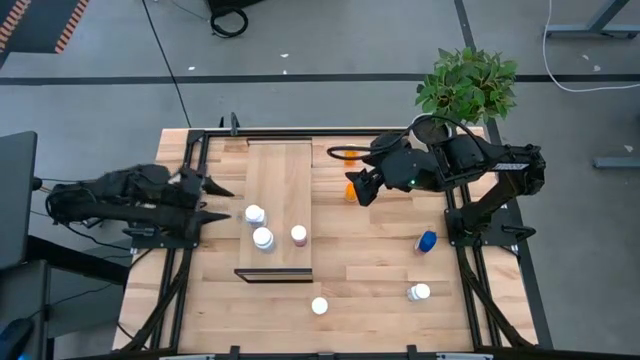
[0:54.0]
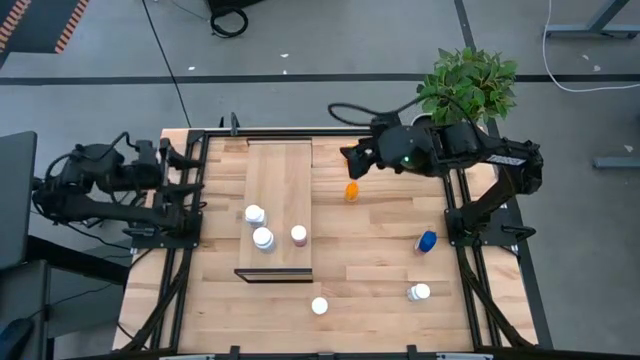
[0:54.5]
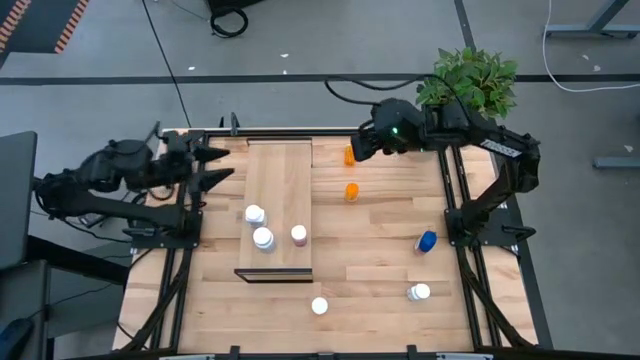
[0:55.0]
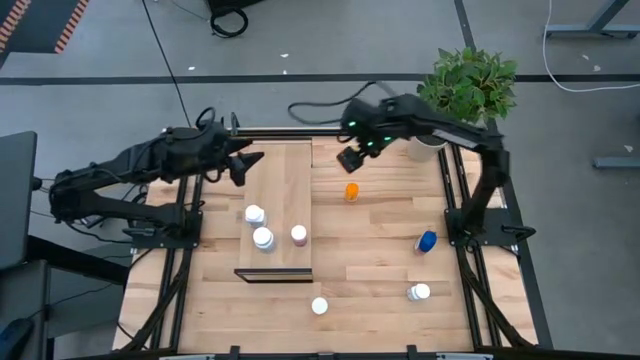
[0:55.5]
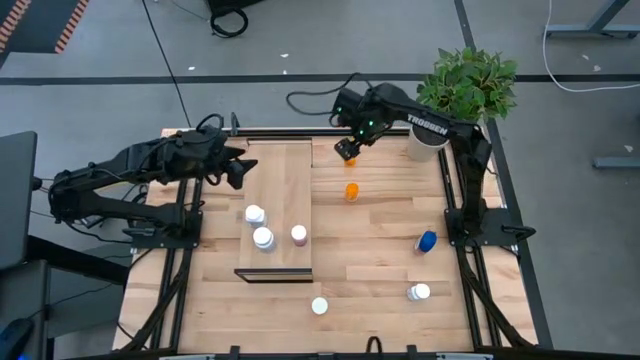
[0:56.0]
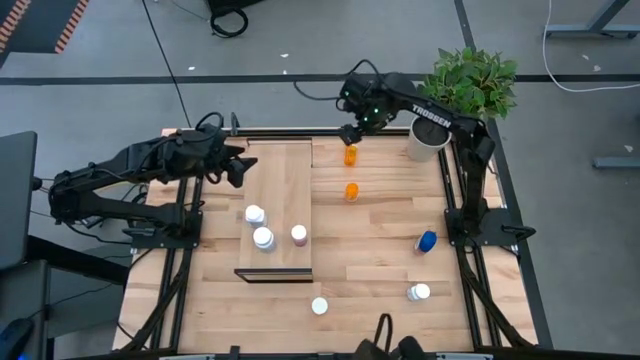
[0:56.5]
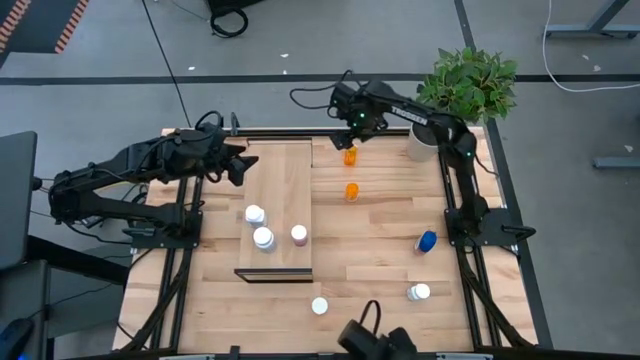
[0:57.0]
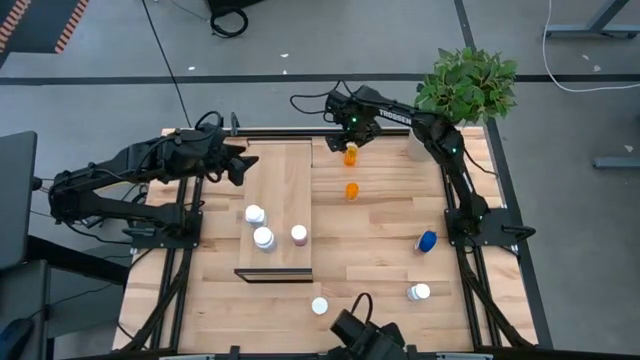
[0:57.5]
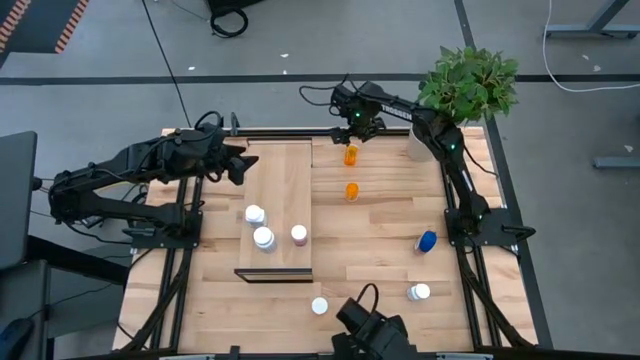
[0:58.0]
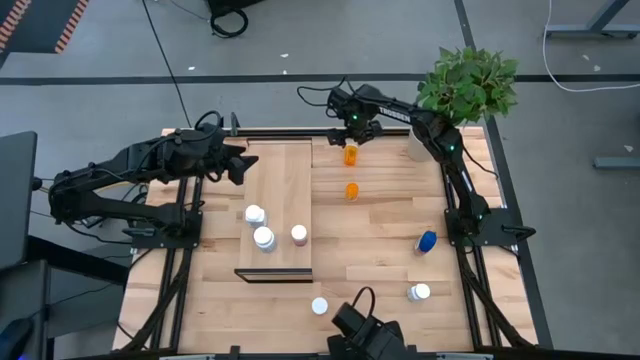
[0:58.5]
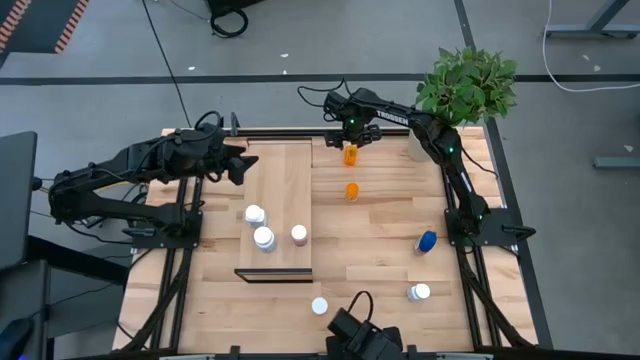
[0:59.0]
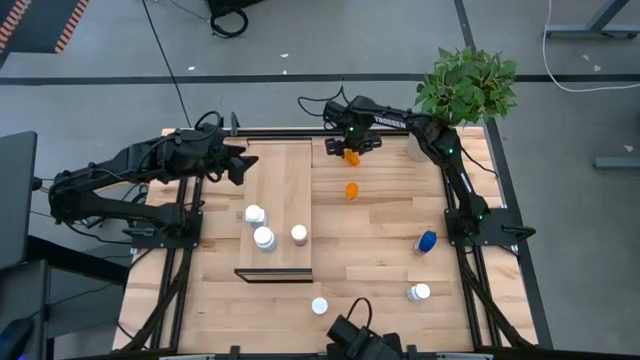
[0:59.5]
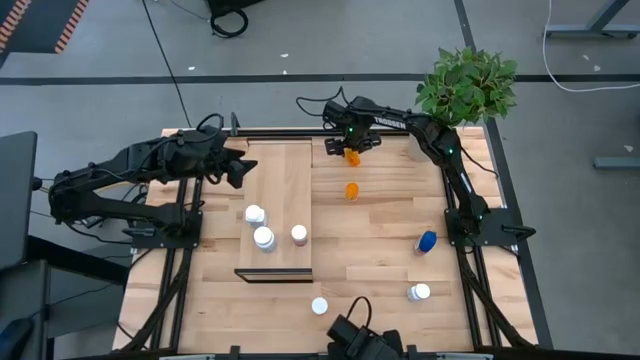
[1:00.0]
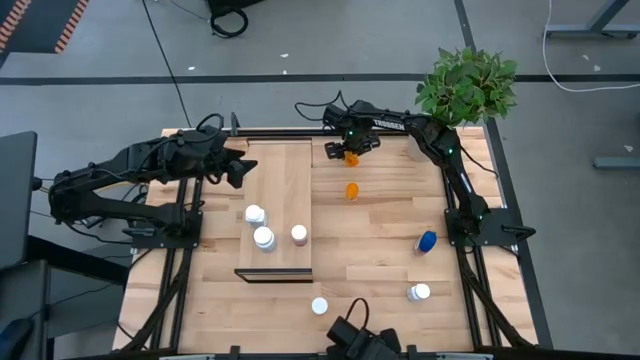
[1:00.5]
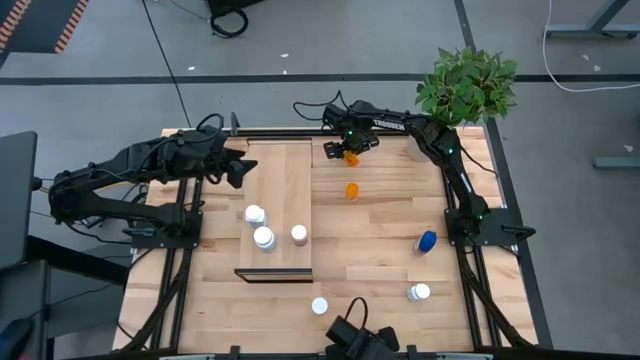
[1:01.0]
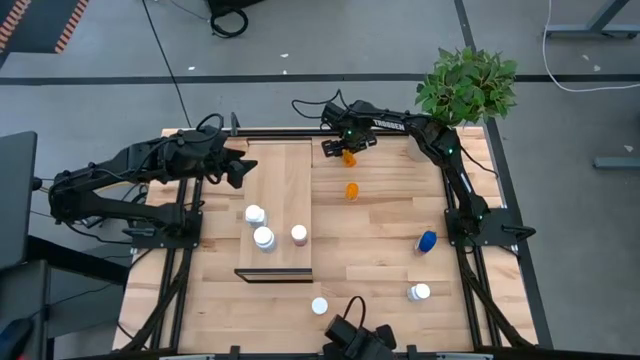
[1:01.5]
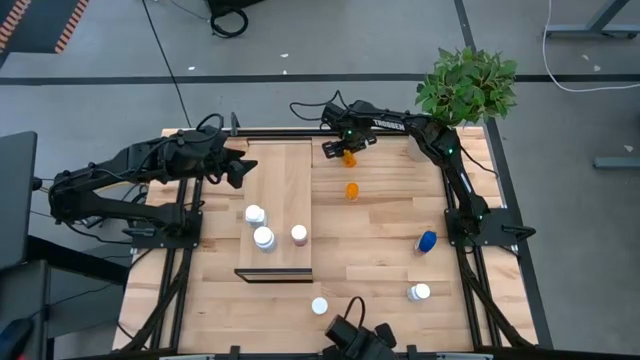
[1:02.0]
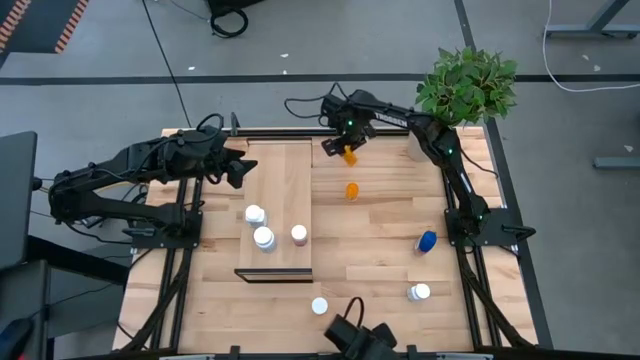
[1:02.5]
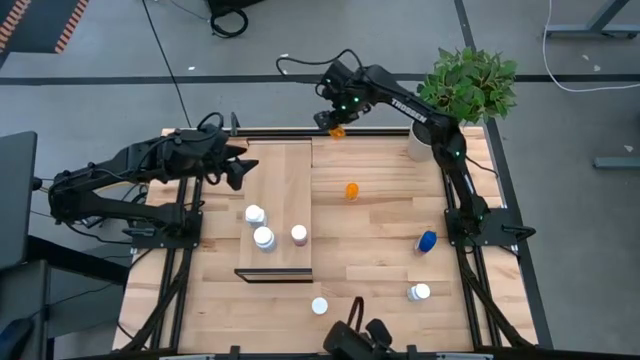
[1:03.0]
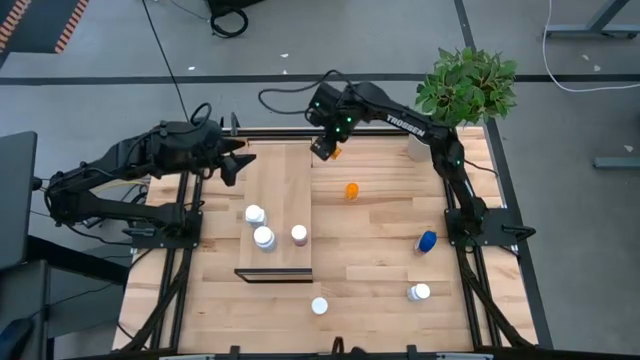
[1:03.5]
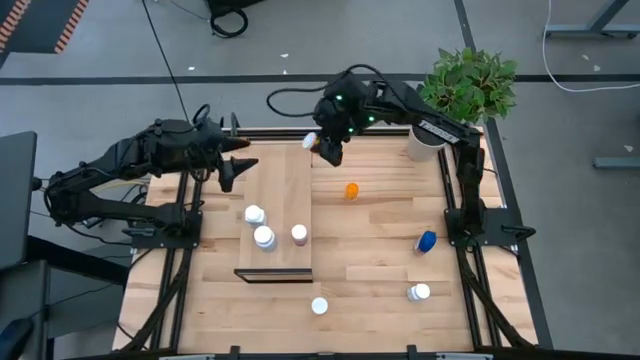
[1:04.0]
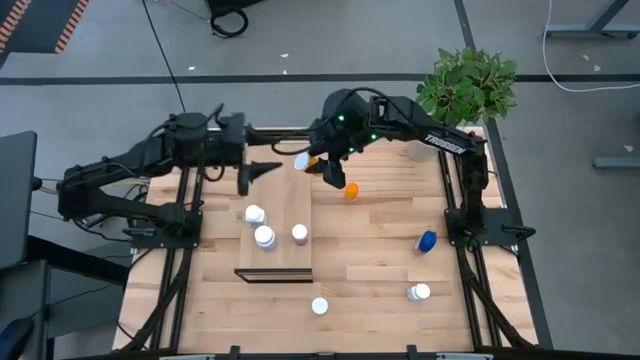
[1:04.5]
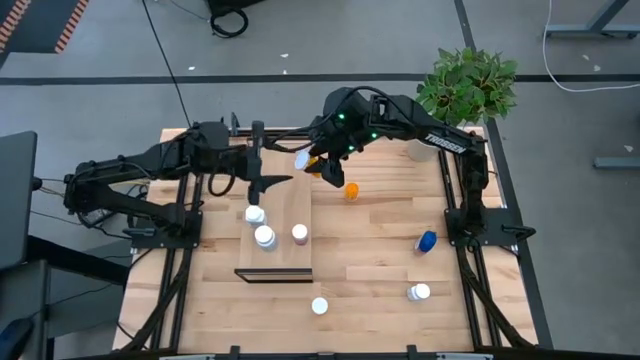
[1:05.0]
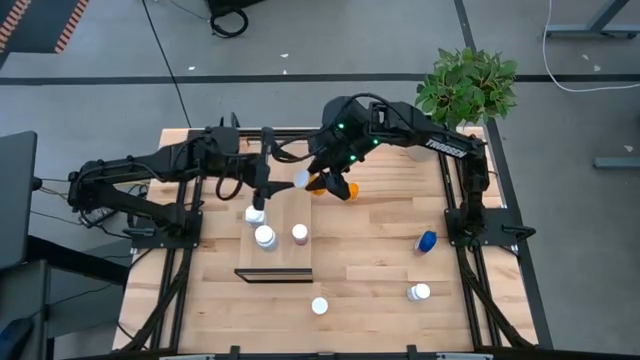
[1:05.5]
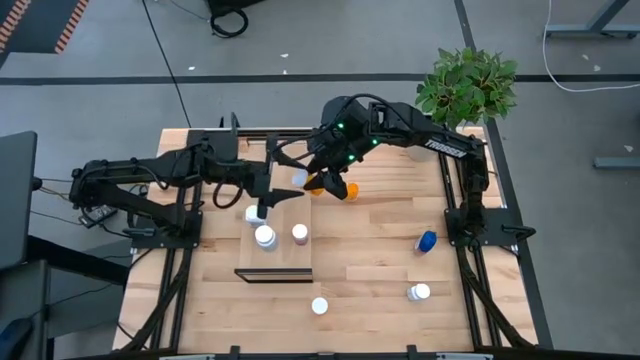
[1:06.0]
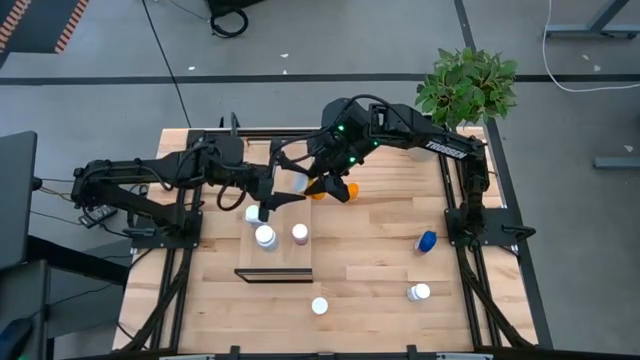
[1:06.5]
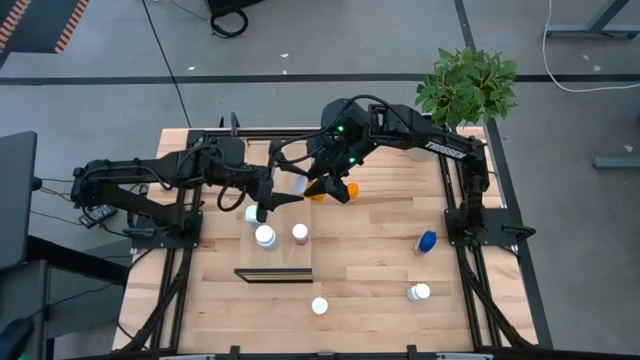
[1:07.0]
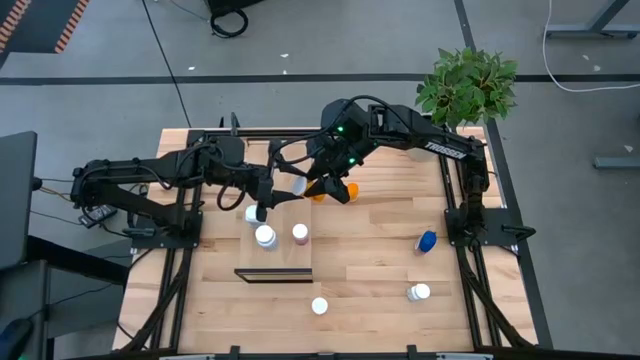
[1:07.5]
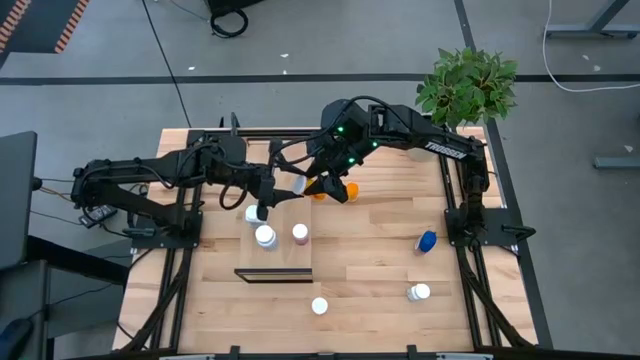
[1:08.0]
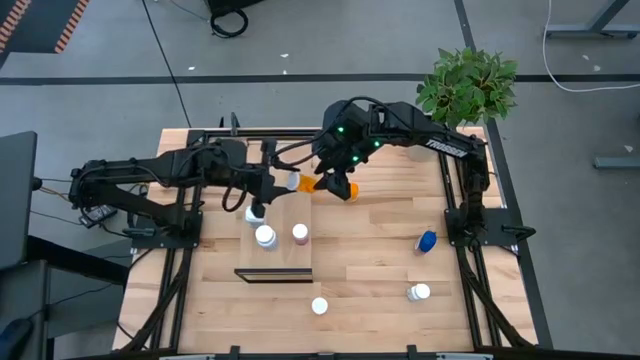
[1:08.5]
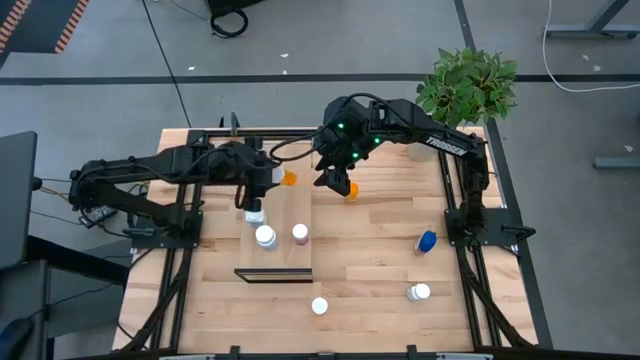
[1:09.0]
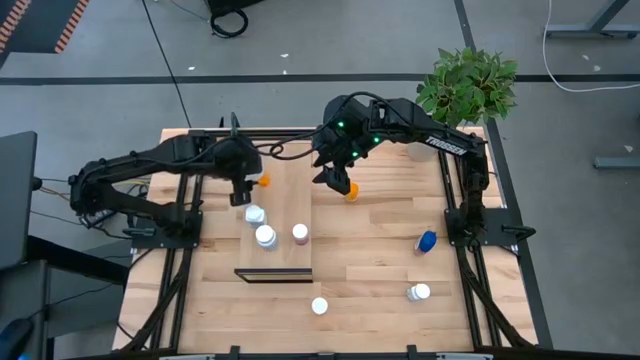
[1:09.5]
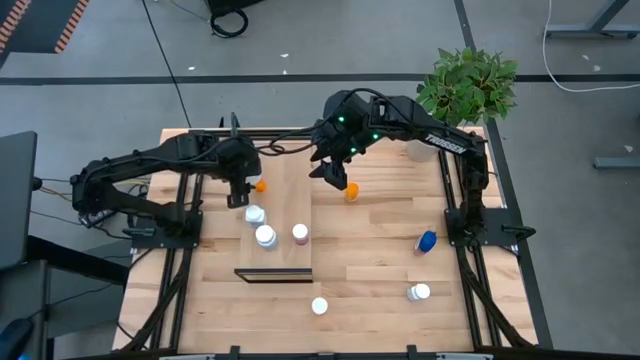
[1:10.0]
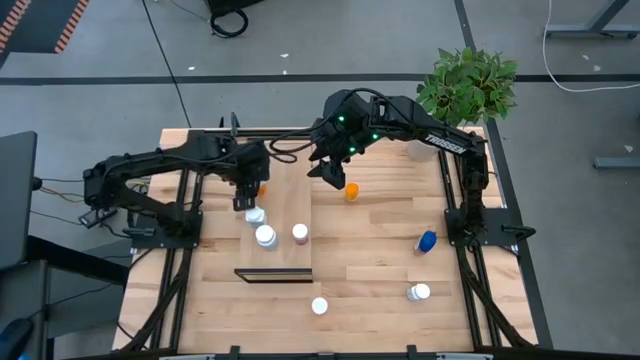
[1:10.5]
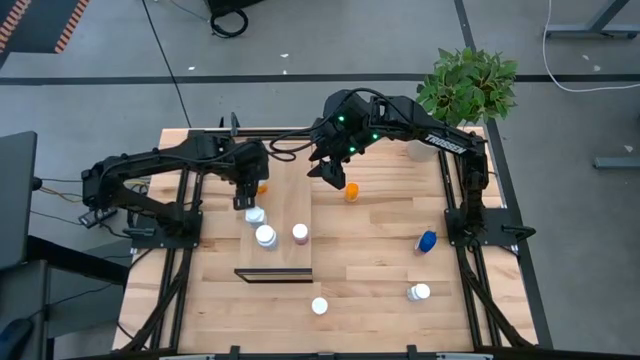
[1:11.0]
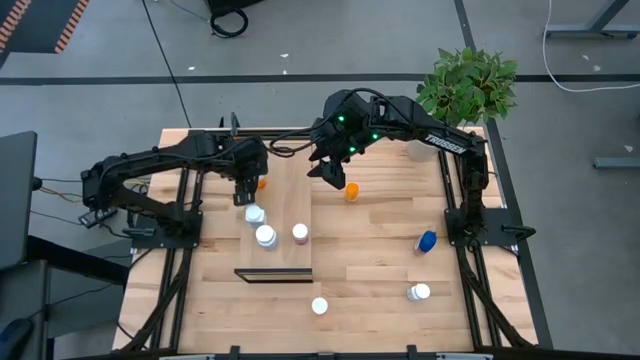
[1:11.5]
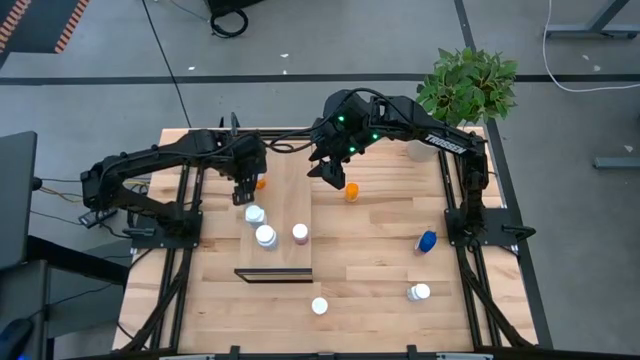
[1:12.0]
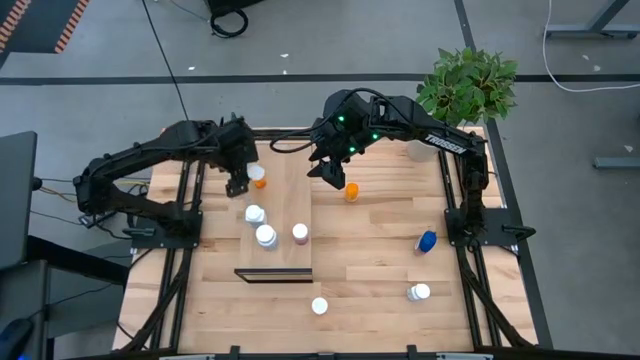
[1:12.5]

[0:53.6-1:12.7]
Task: Pick and place medicine bottles onto shelf by color
Put the top orange pill bottle on the shelf

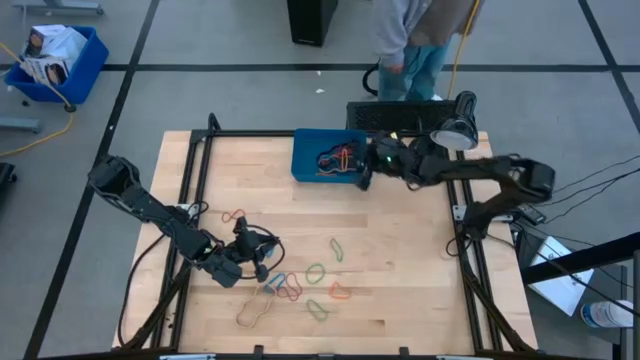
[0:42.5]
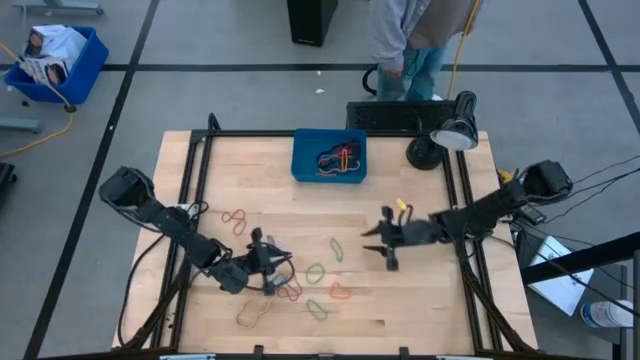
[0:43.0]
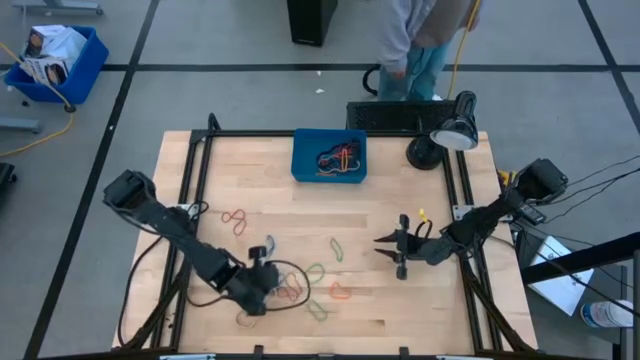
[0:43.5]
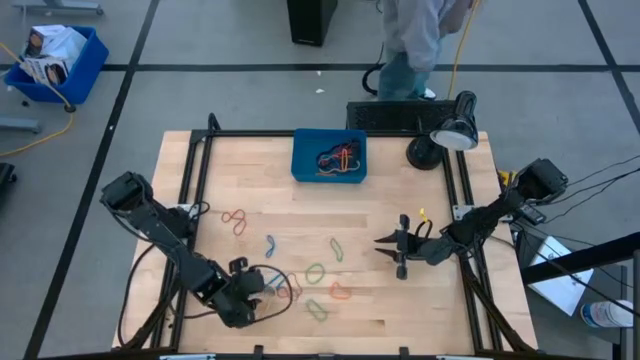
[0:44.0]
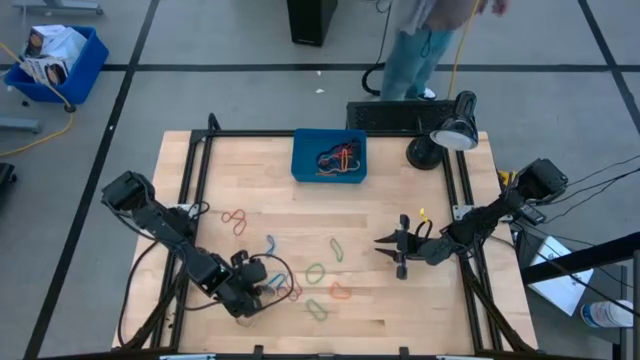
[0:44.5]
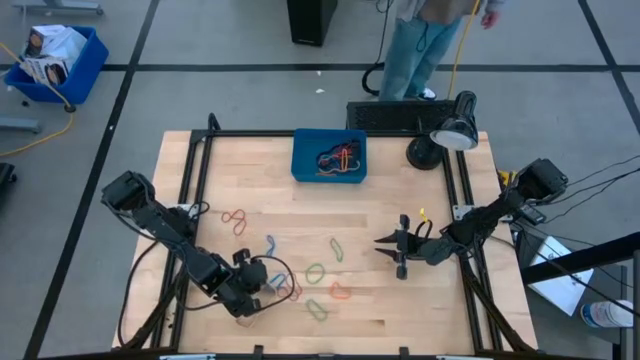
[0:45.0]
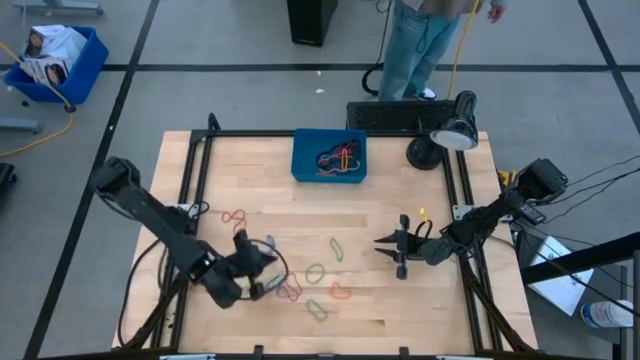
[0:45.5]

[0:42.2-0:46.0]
Task: Pick and place rubber bands into bin
Put the brown rubber band into the blue bin
